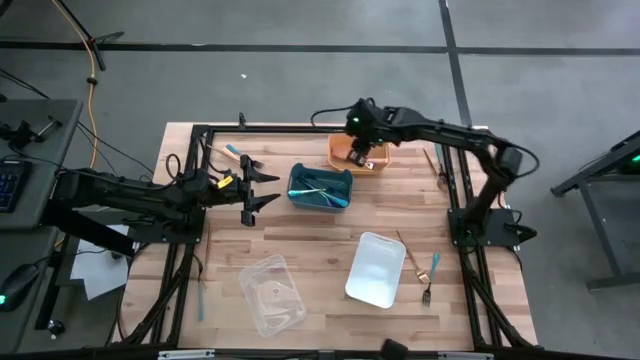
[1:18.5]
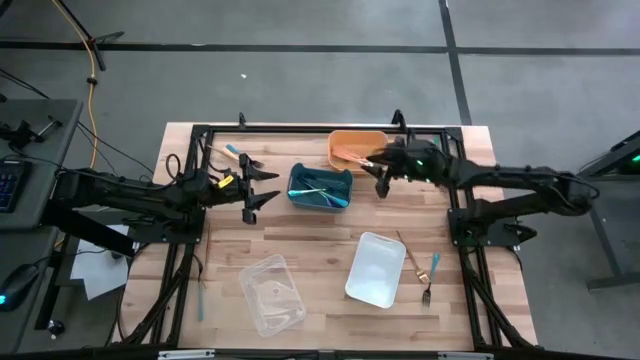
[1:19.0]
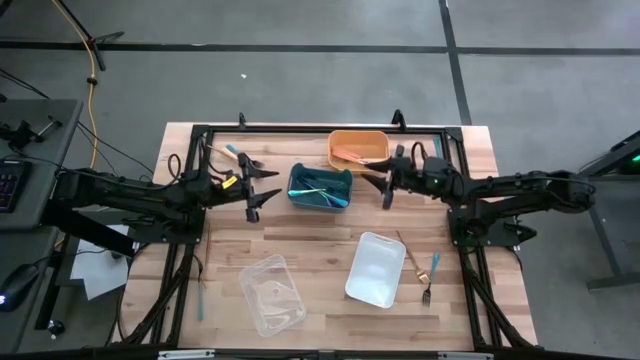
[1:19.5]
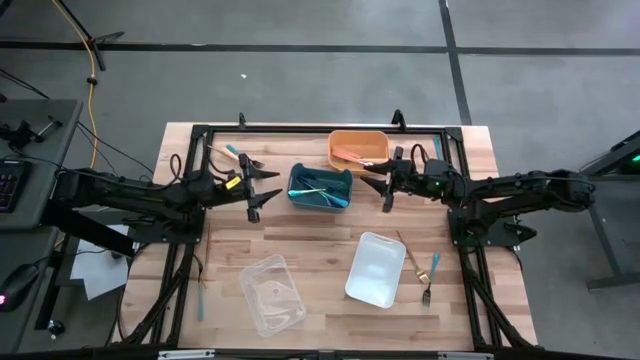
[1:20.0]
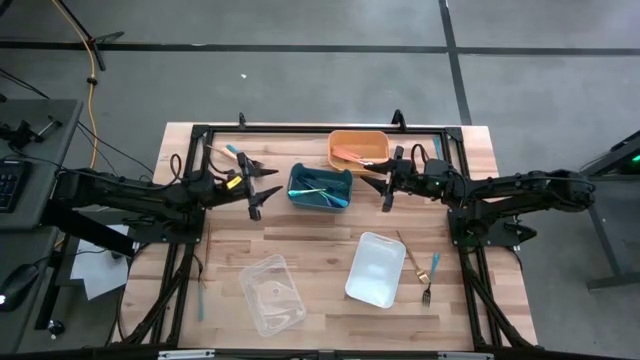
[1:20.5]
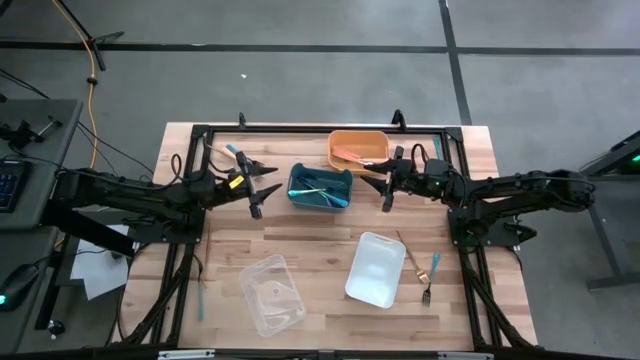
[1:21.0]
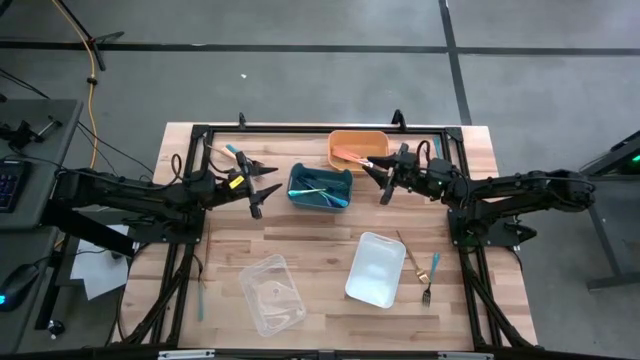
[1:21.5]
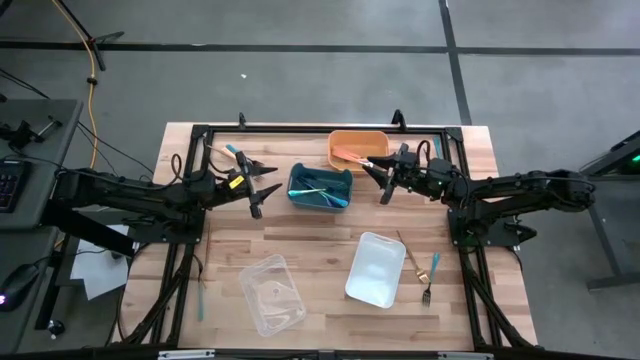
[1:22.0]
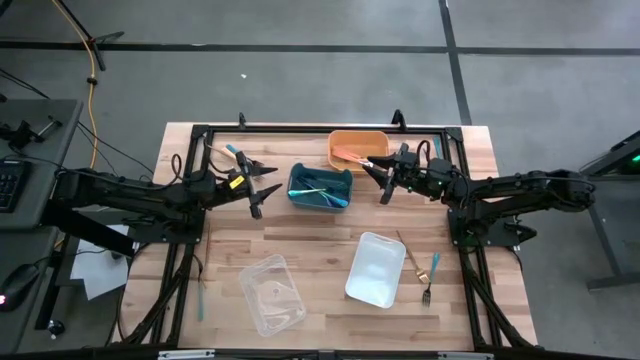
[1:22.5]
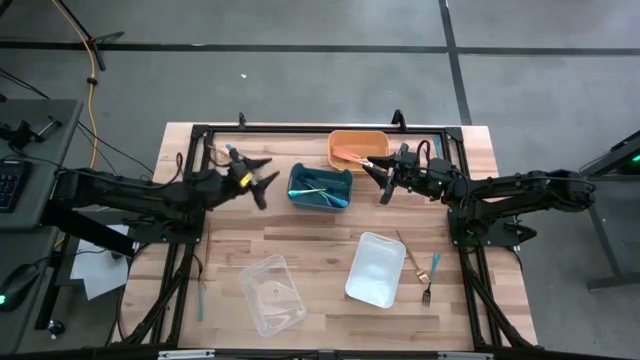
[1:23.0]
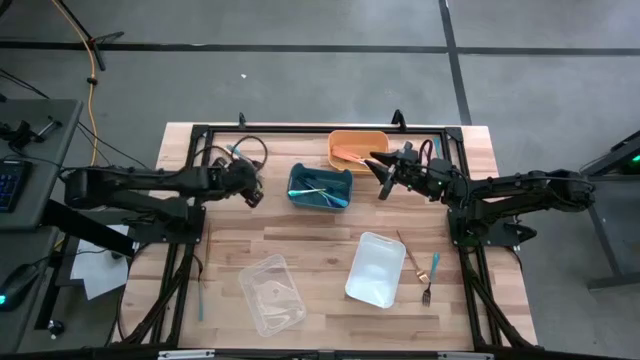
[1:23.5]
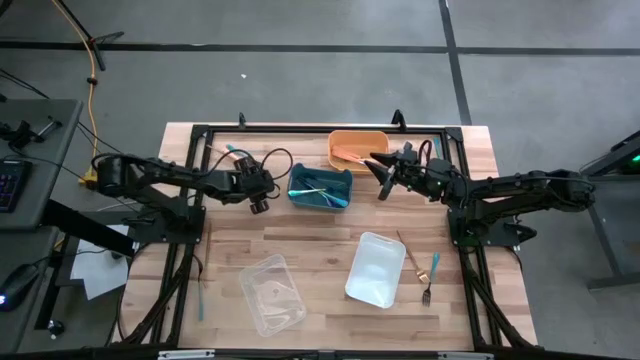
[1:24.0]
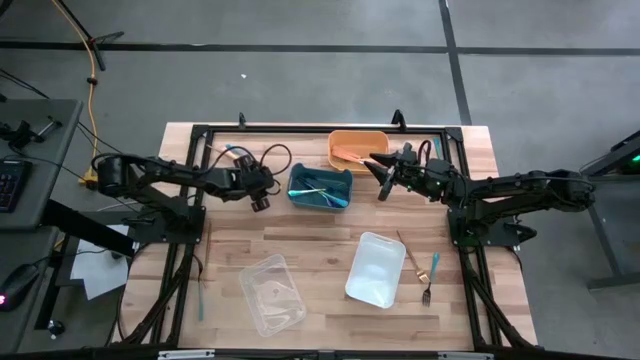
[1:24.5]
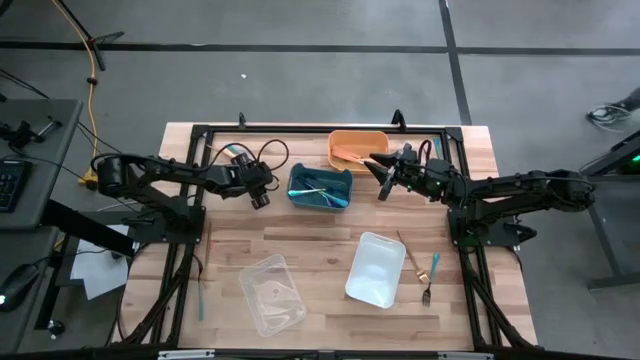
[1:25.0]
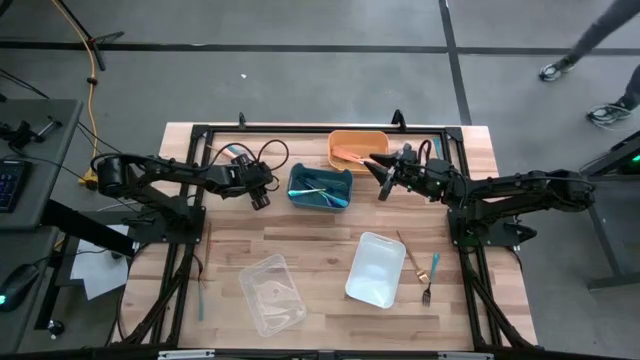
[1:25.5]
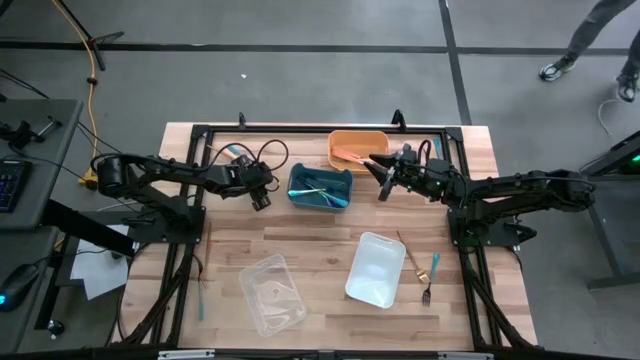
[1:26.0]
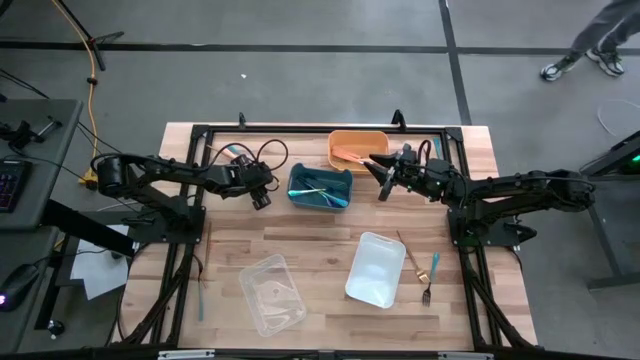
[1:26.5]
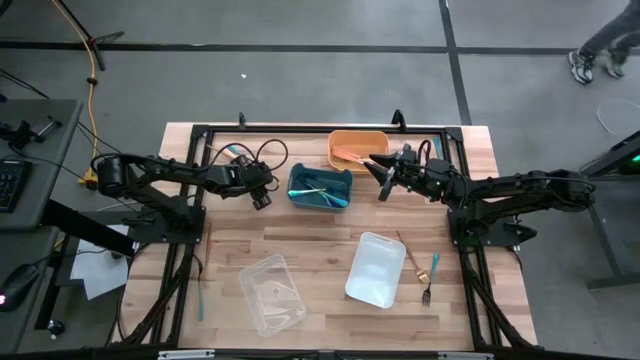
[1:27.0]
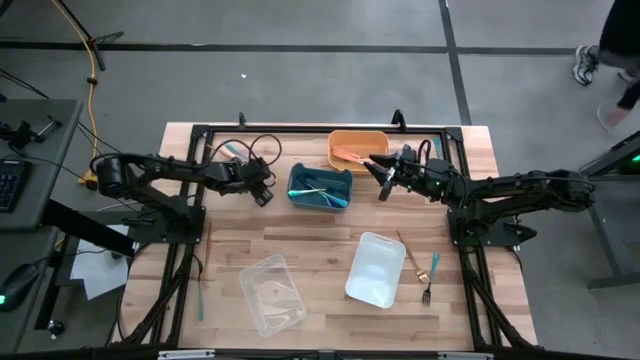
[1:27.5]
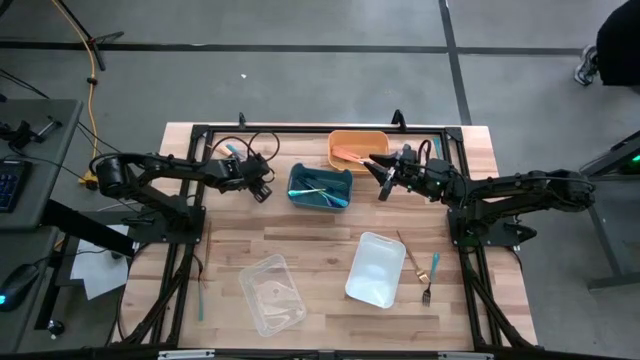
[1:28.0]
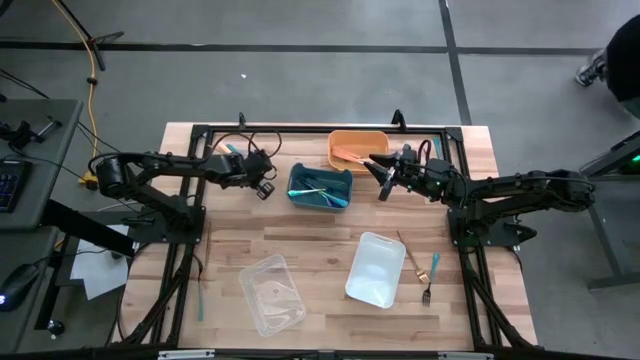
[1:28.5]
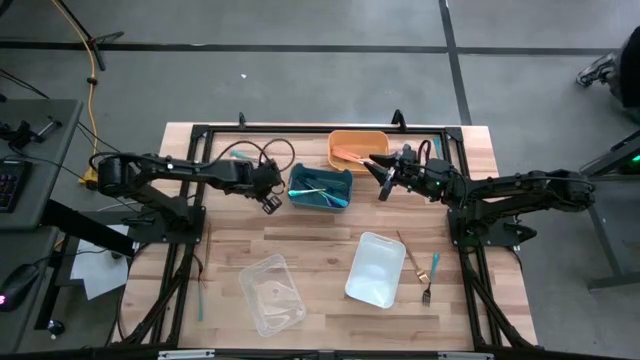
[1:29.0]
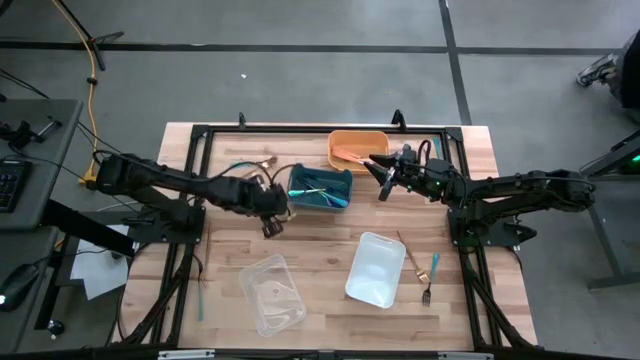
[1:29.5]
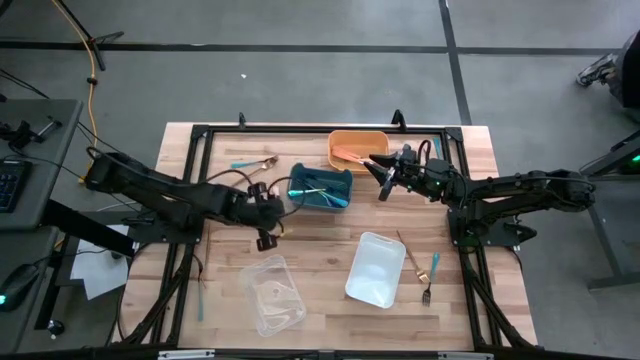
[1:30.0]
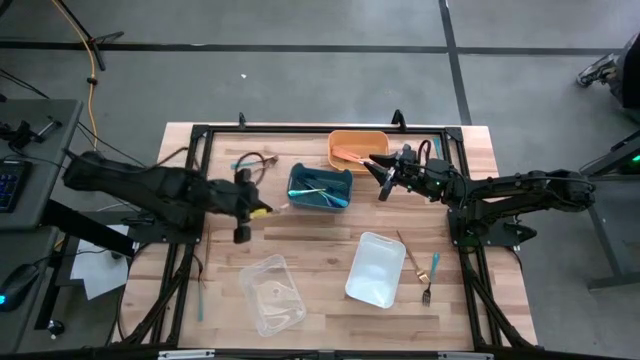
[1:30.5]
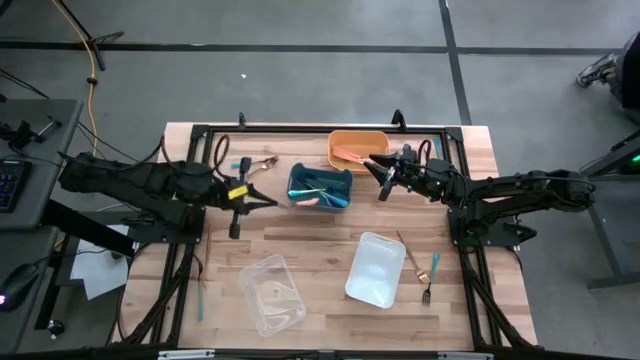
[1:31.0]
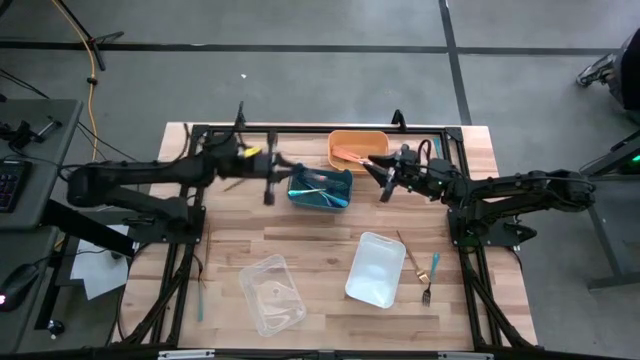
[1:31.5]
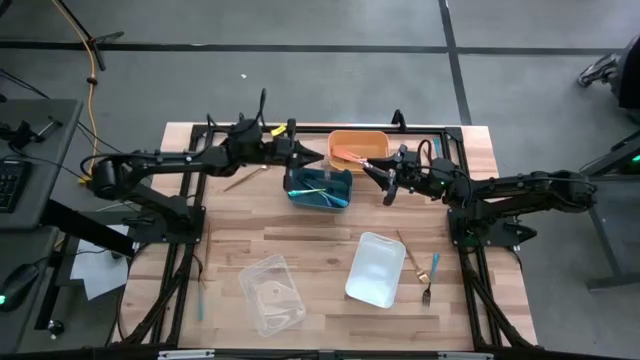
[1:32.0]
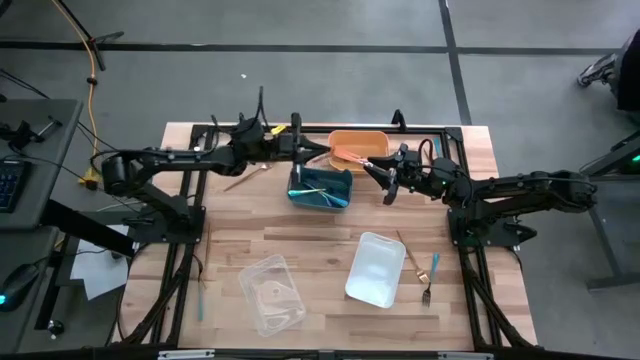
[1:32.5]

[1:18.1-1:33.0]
Task: Sort silverware by color (type)
Put the light orange fork into the yellow bin

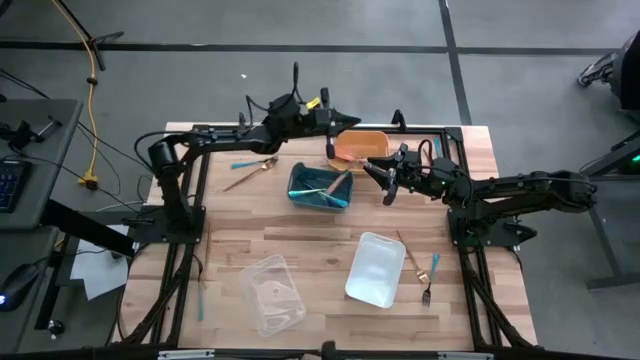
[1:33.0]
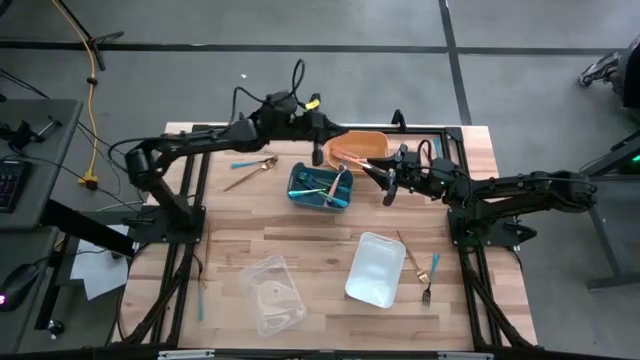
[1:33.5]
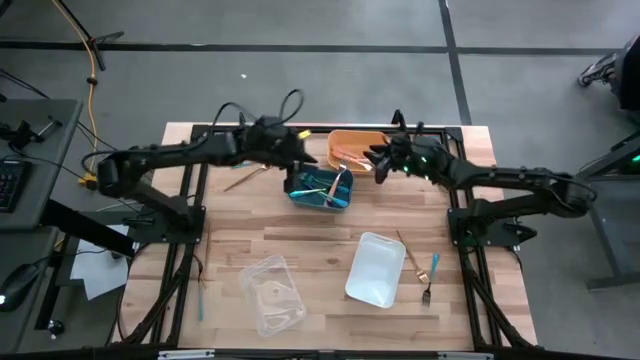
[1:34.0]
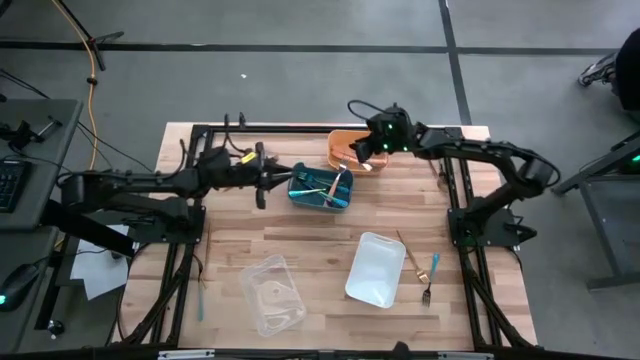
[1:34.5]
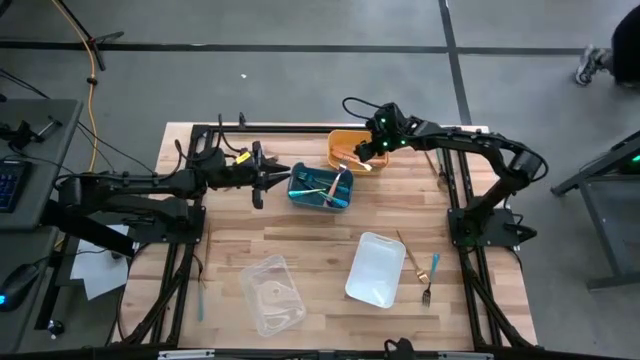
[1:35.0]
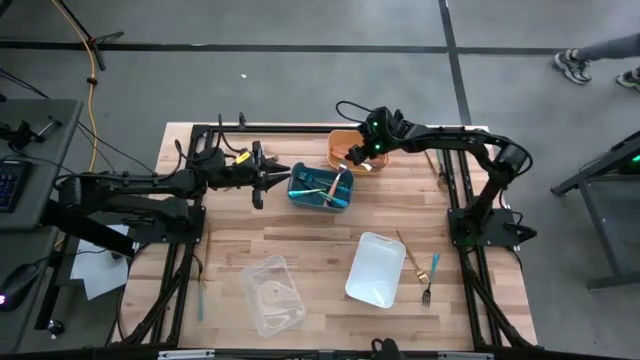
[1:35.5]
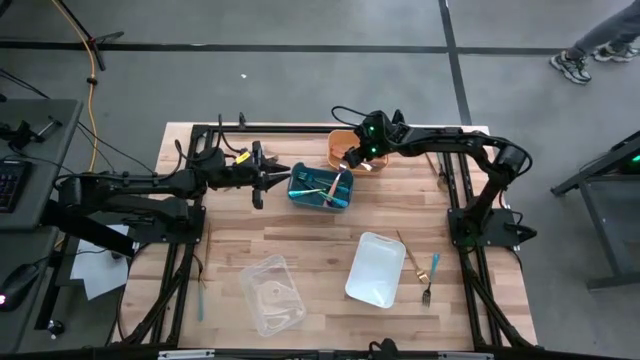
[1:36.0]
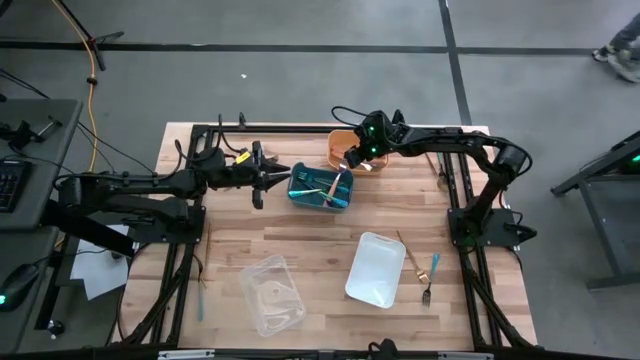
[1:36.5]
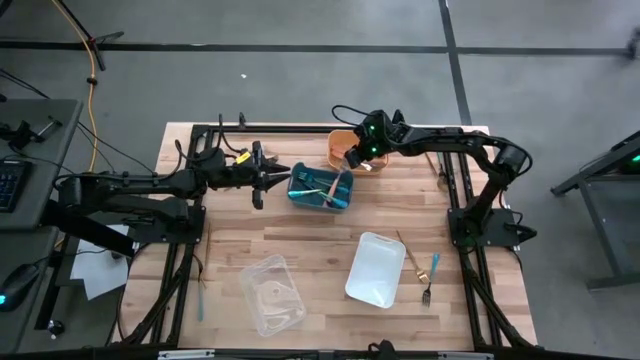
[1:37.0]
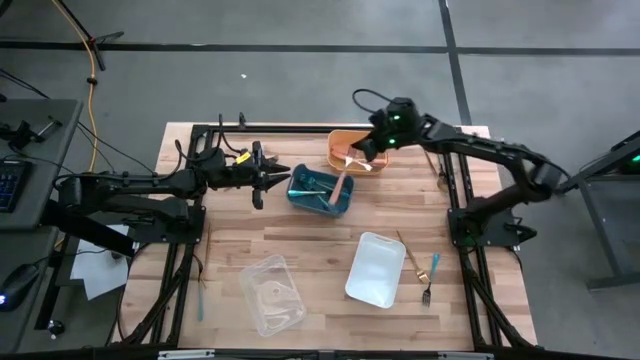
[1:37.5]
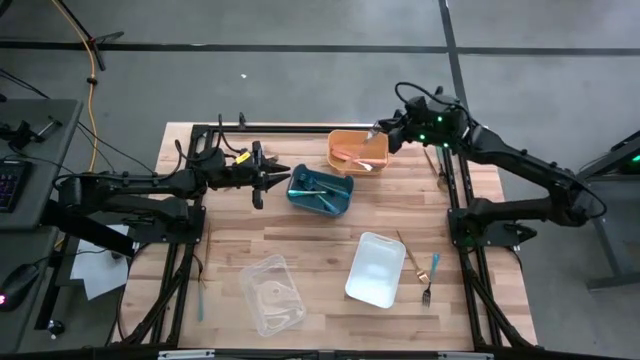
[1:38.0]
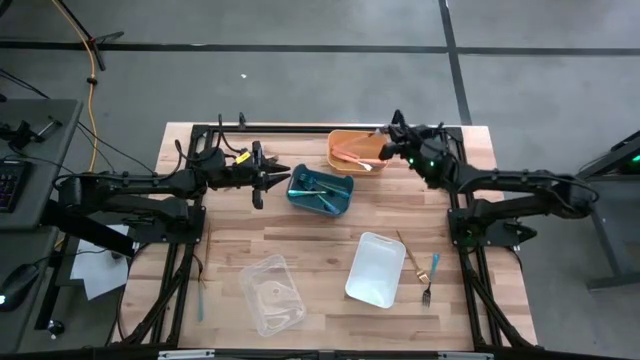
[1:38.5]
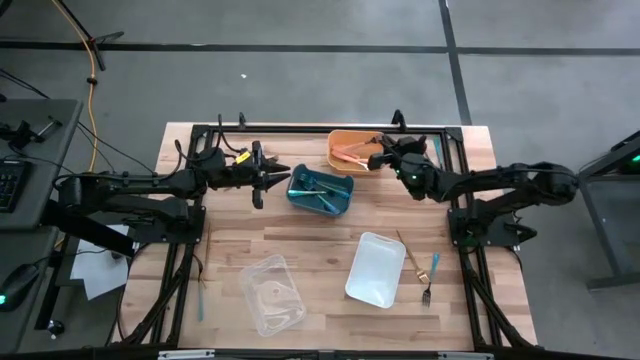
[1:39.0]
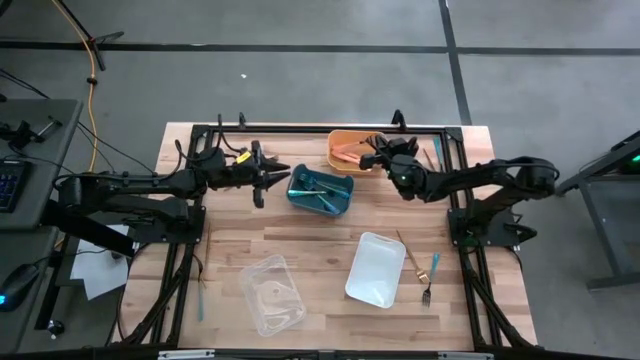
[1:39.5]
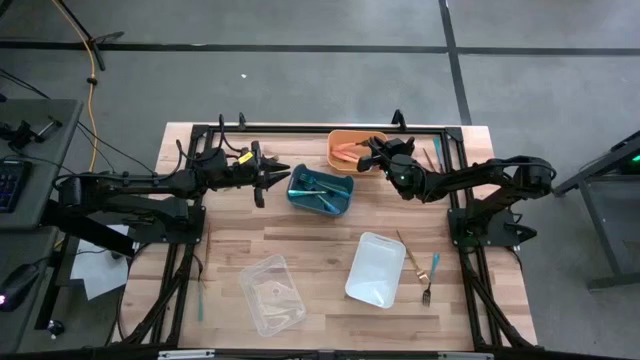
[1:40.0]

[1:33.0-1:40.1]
Put the light orange fork into the yellow bin
